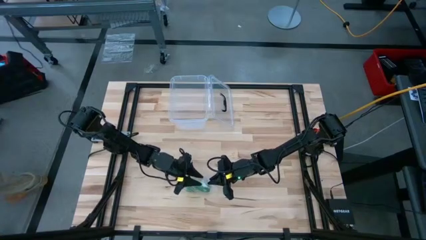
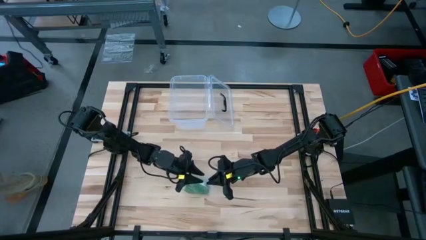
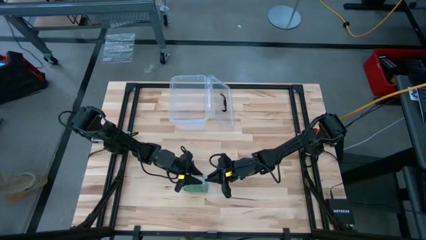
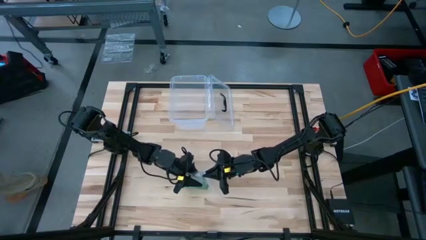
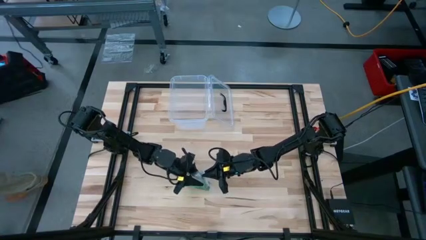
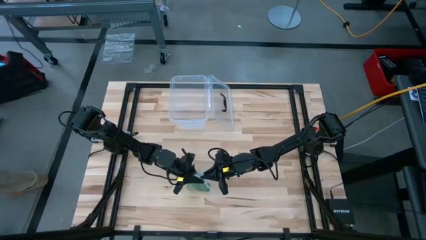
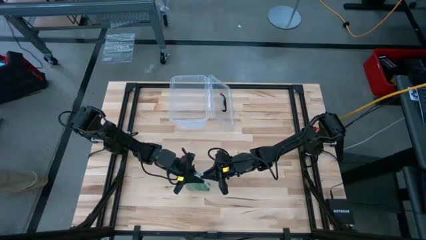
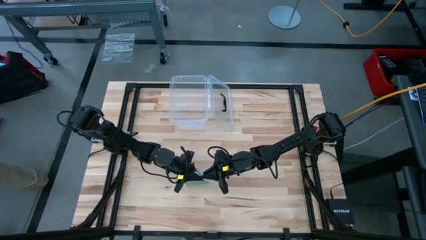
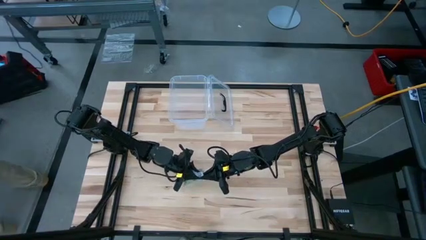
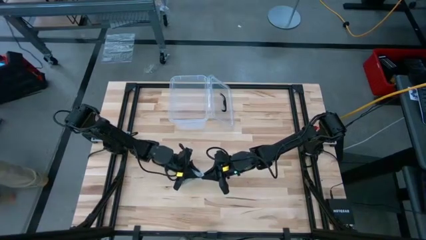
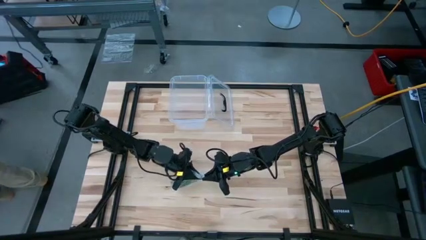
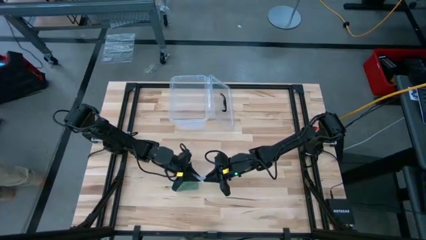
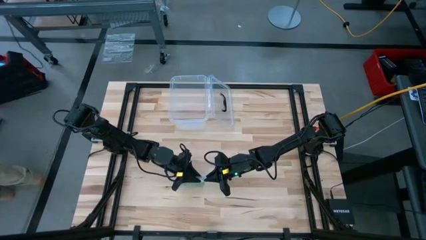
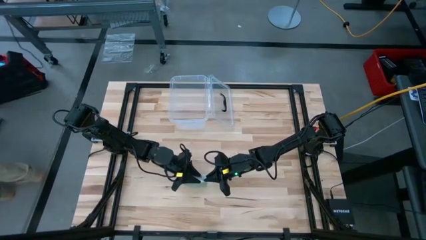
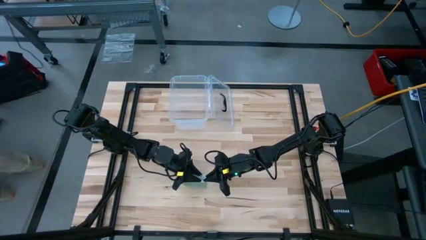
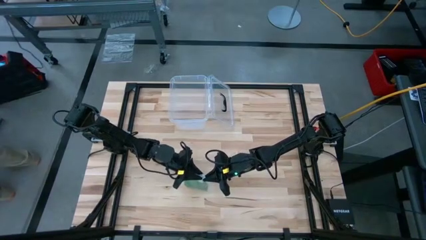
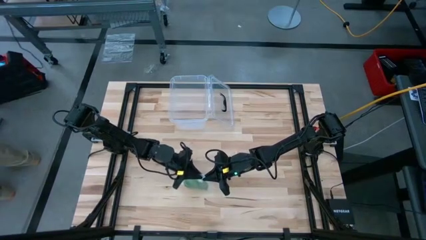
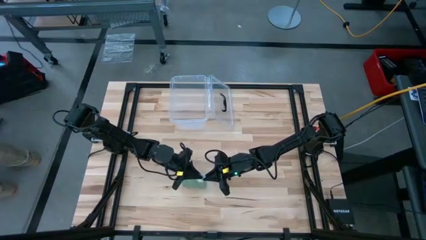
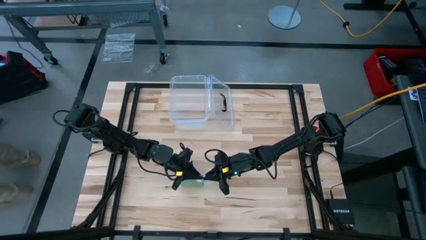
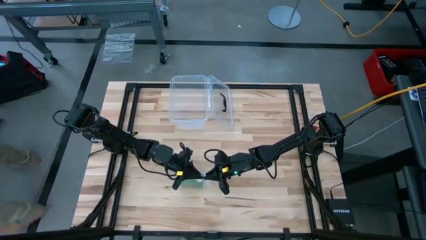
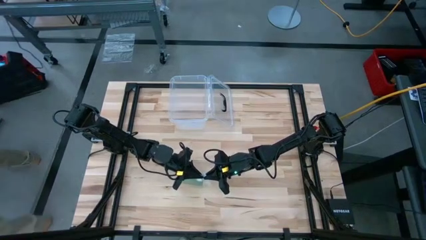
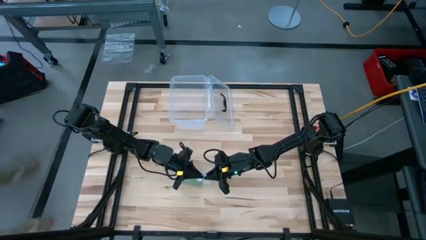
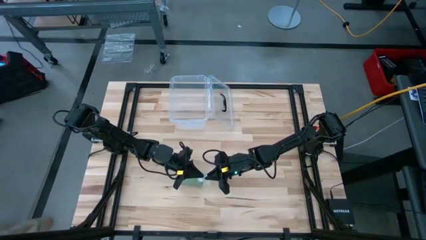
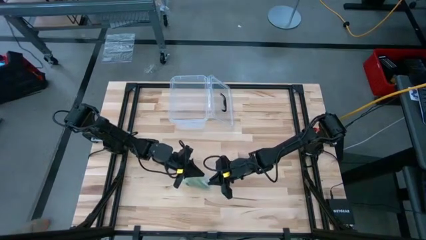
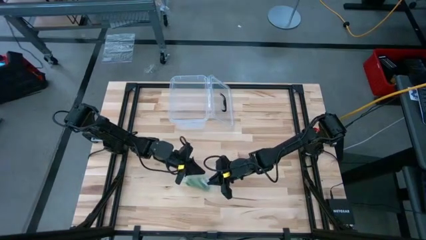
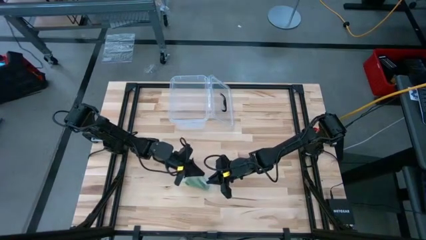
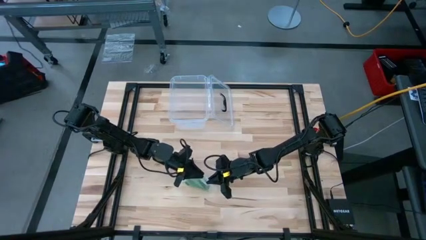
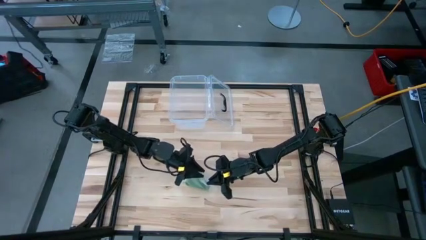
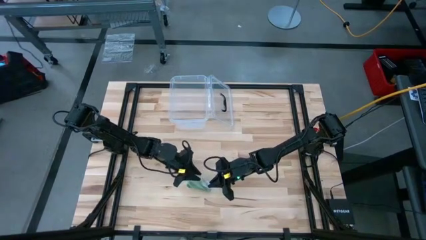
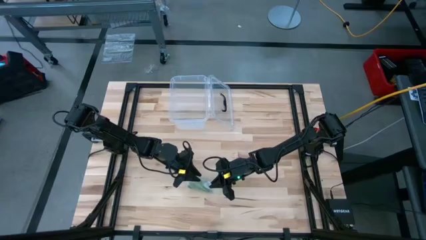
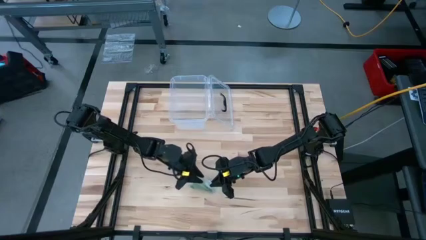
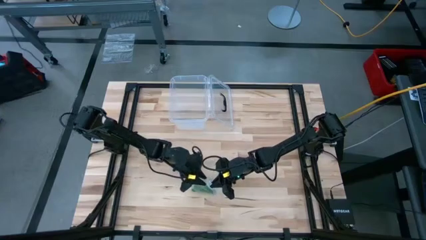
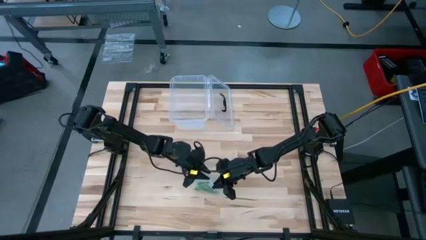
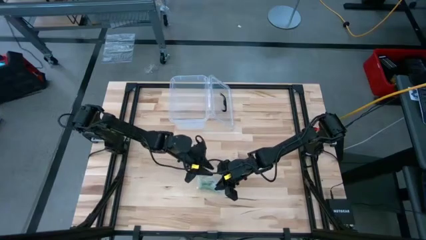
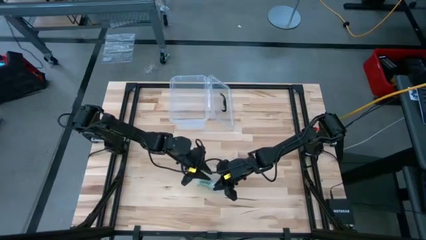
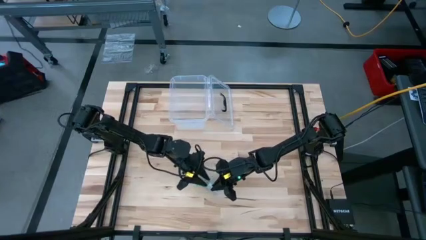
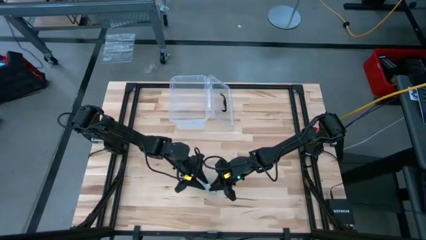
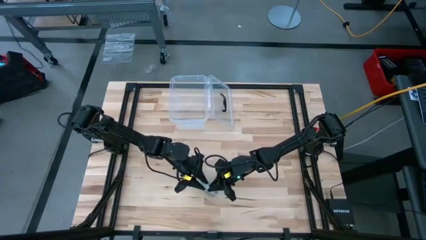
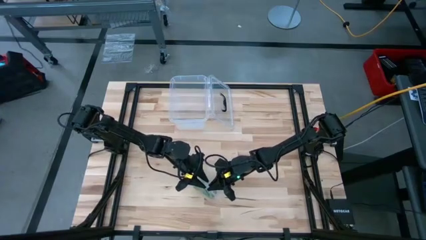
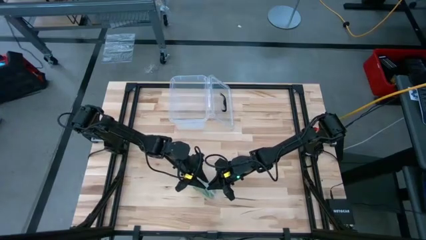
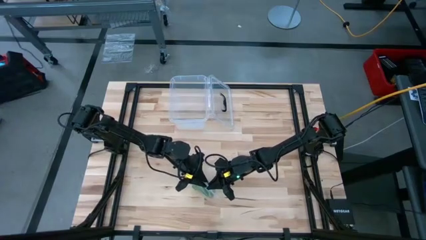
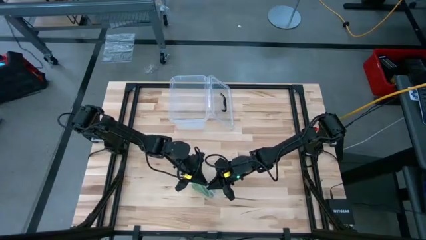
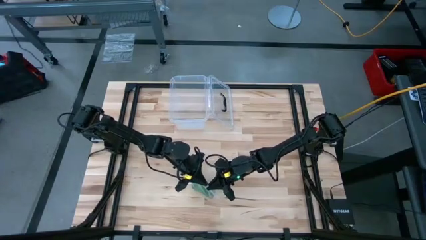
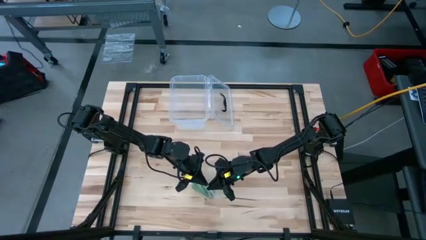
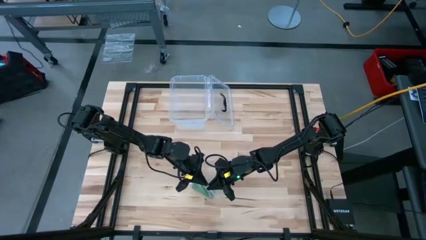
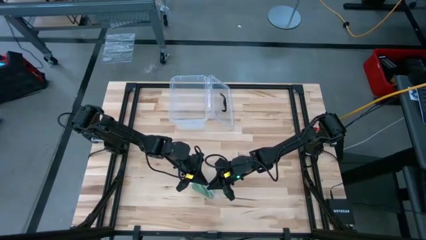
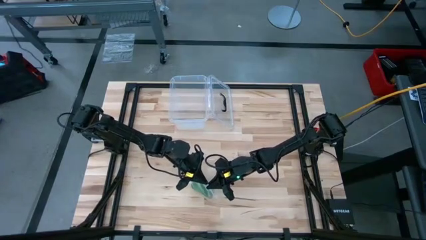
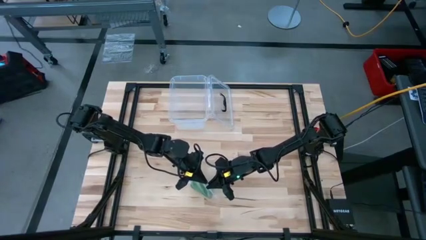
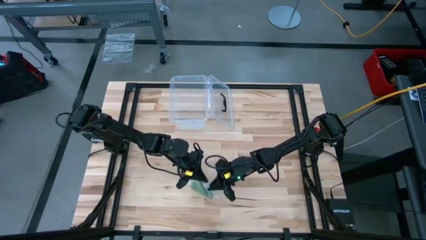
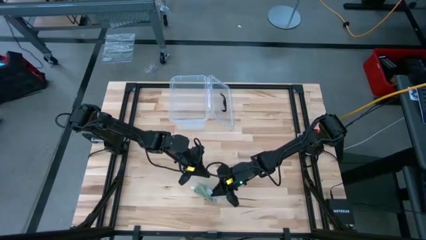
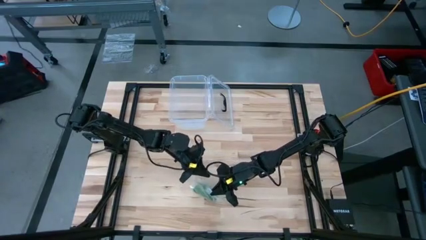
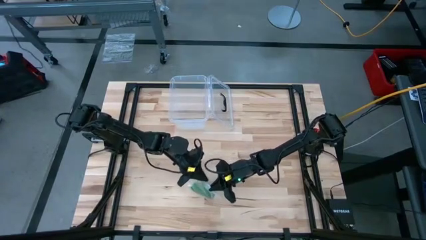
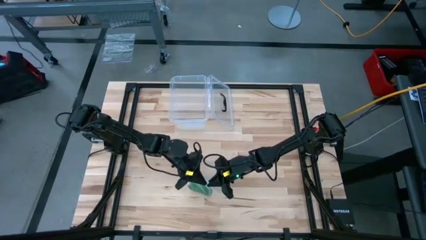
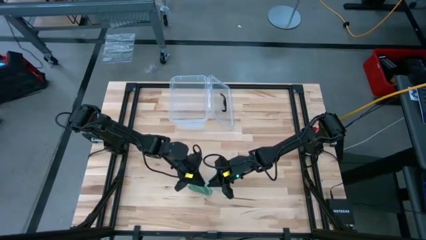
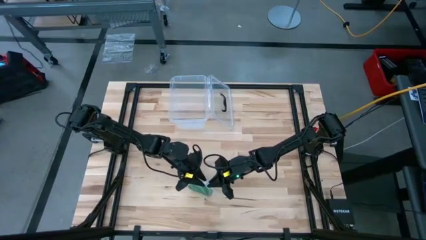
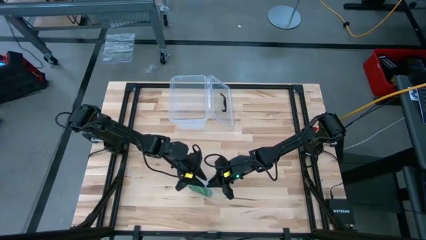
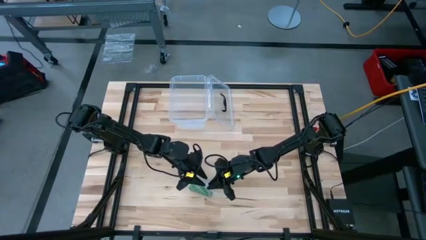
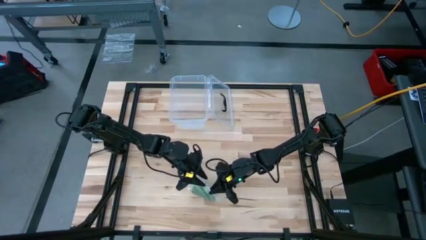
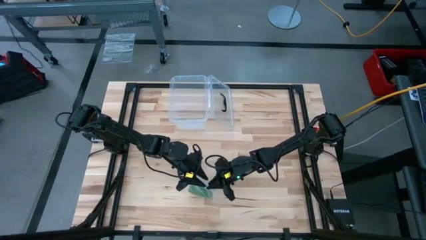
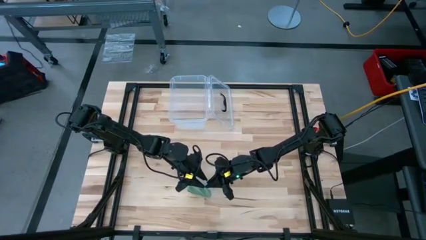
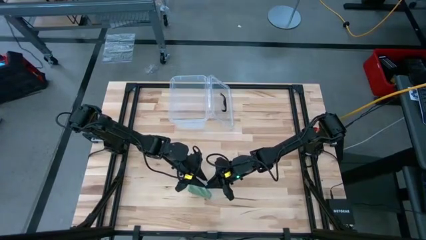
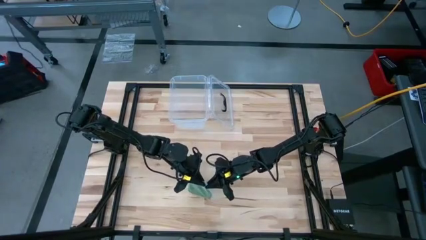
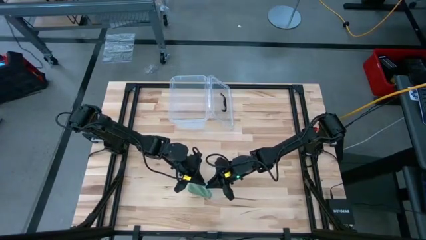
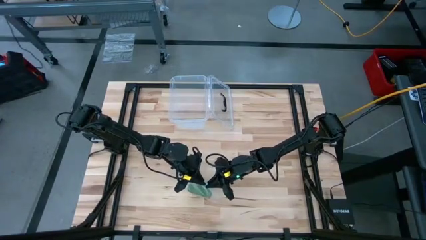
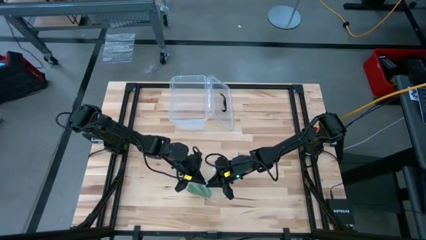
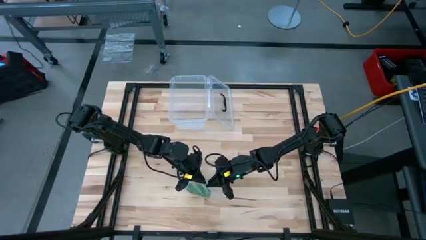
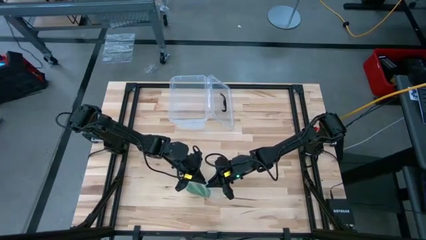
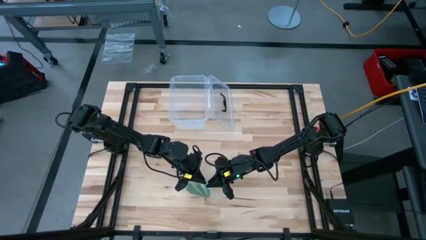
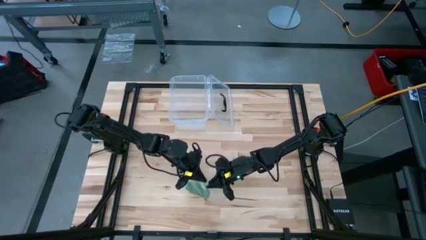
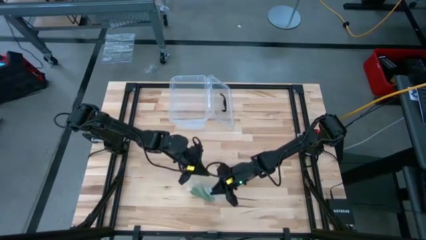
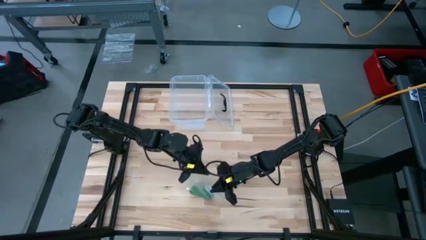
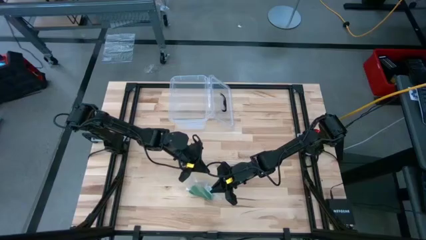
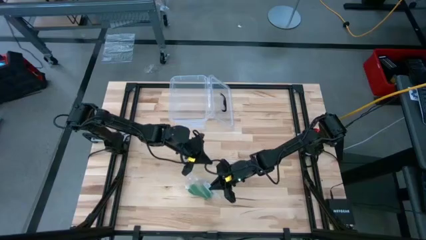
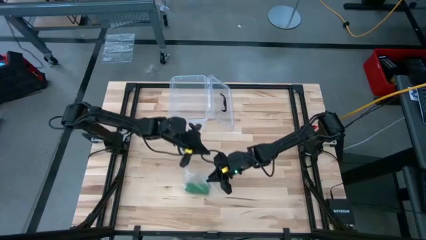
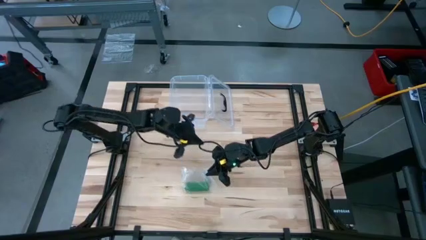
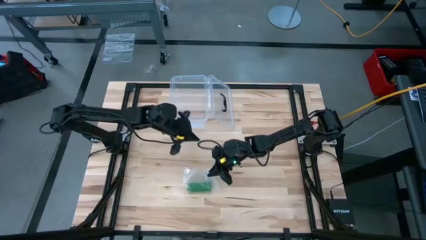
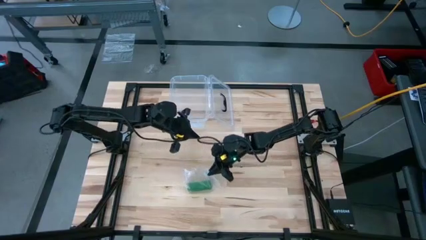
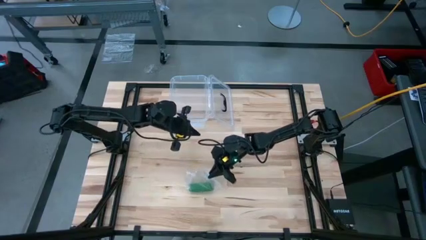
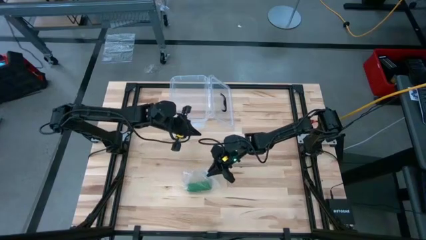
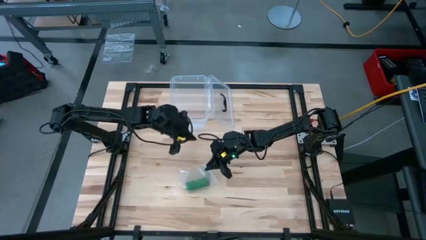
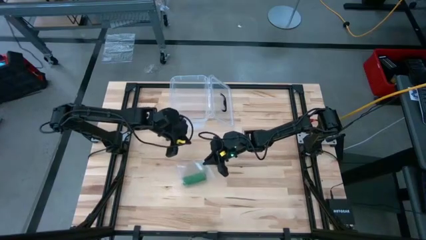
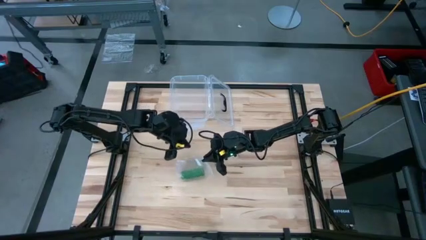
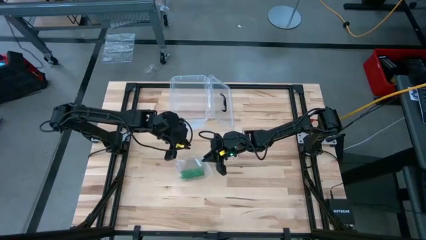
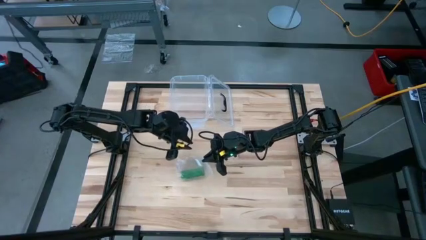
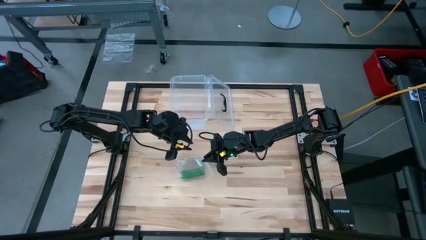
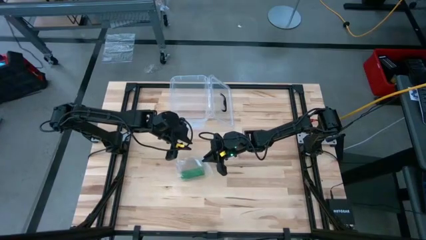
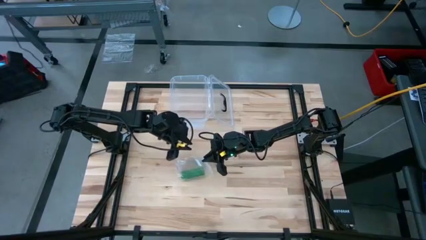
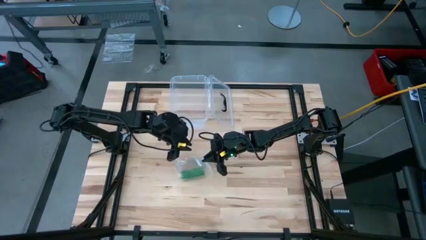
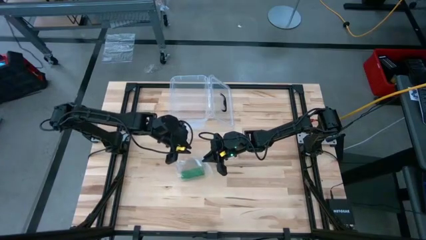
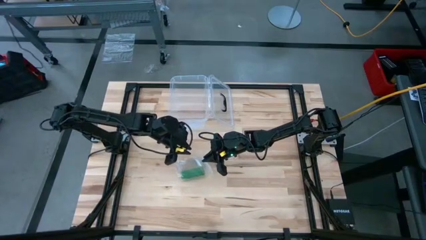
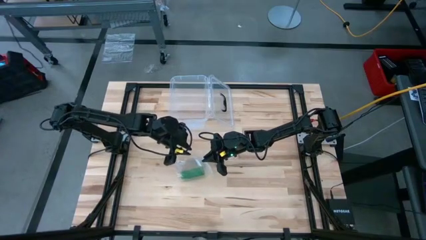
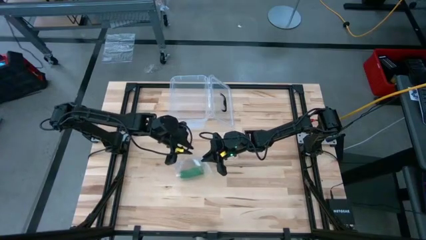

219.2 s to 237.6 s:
Task: Roll bandage
Close the transparent zip bag
